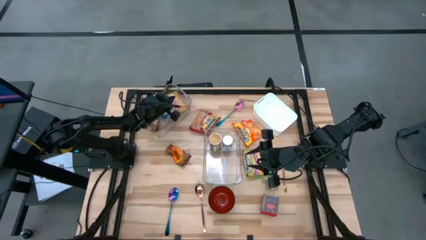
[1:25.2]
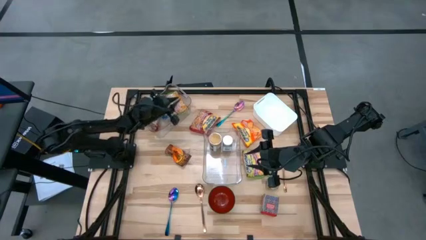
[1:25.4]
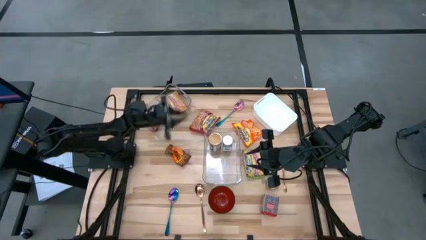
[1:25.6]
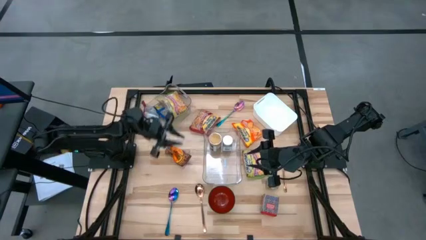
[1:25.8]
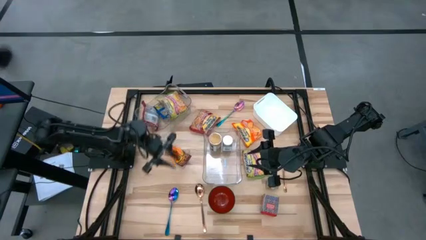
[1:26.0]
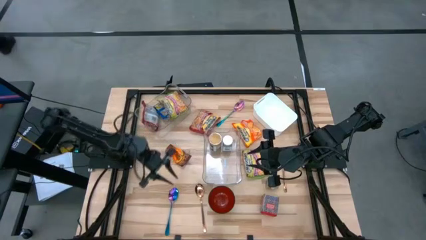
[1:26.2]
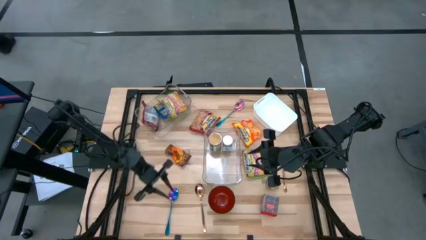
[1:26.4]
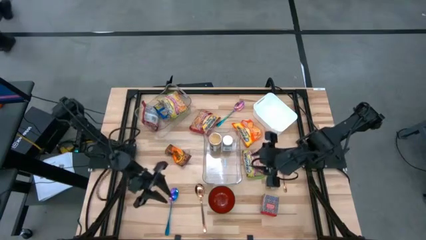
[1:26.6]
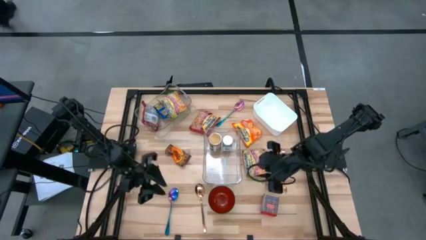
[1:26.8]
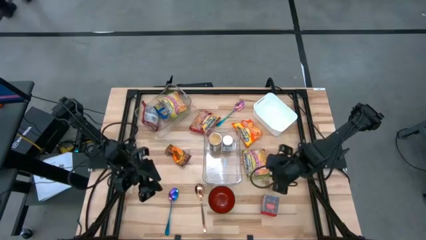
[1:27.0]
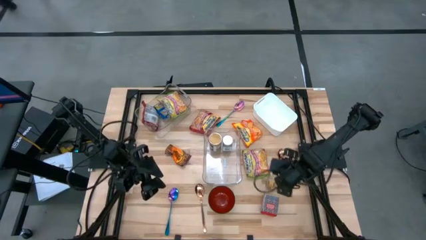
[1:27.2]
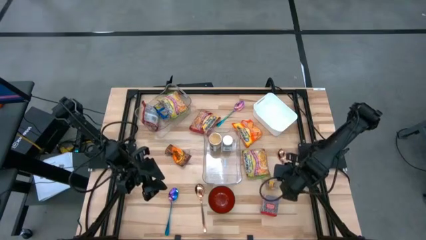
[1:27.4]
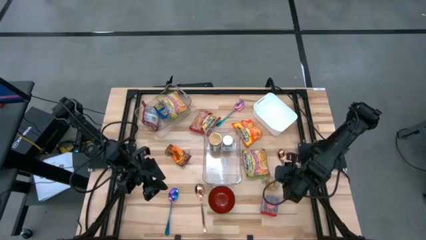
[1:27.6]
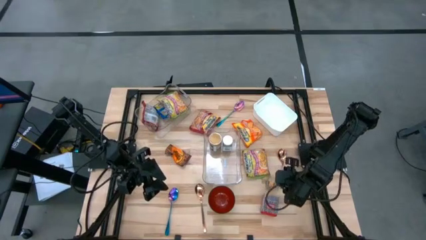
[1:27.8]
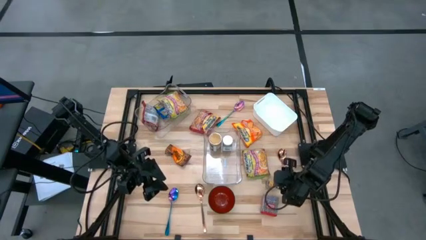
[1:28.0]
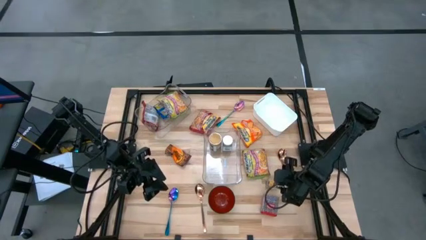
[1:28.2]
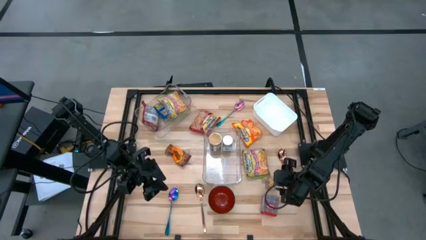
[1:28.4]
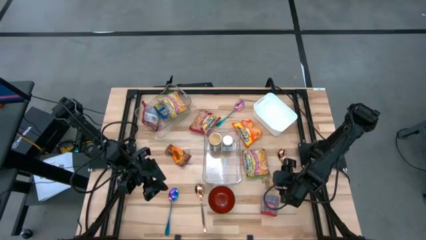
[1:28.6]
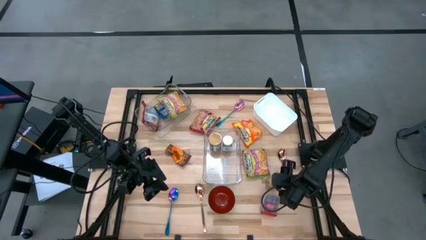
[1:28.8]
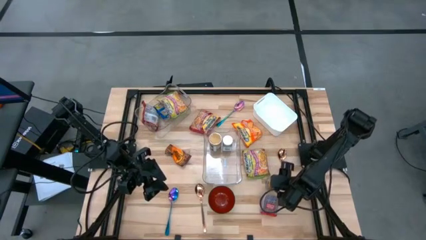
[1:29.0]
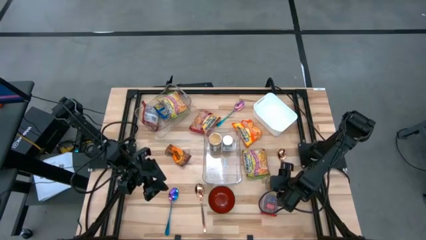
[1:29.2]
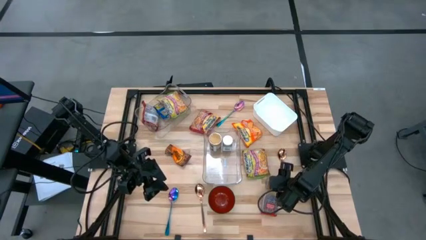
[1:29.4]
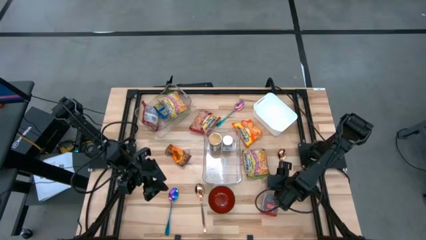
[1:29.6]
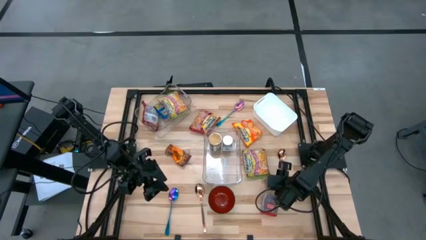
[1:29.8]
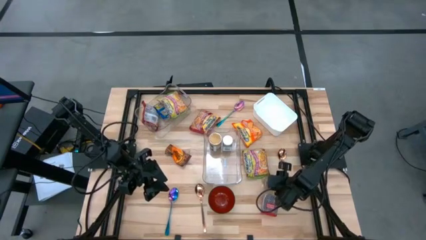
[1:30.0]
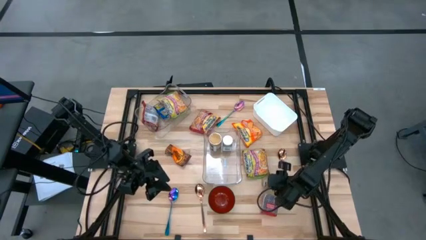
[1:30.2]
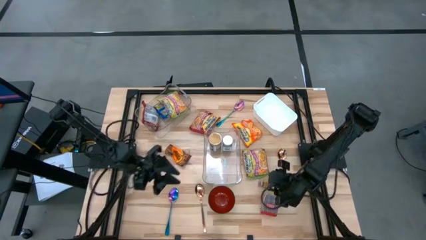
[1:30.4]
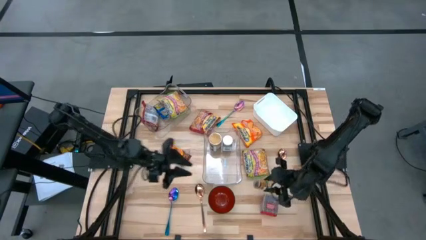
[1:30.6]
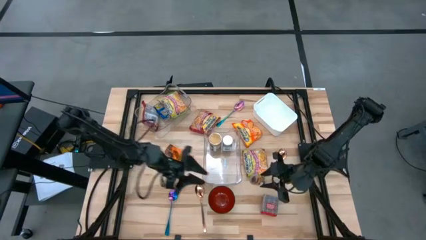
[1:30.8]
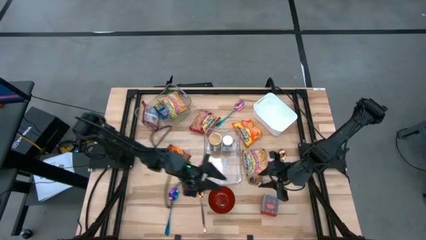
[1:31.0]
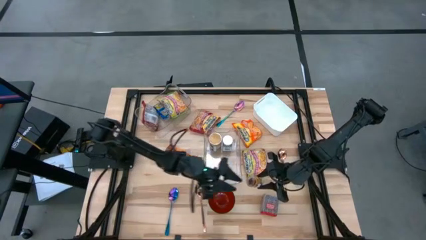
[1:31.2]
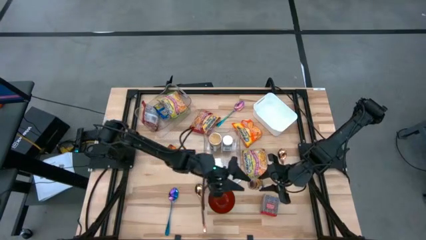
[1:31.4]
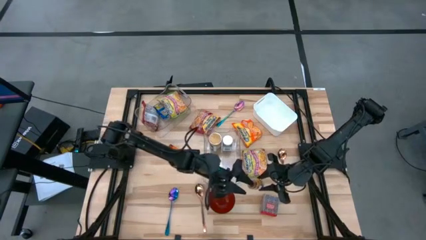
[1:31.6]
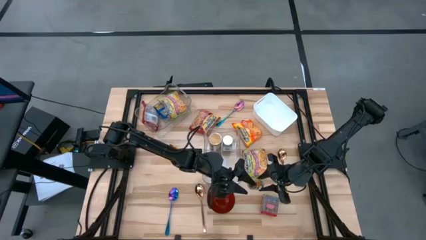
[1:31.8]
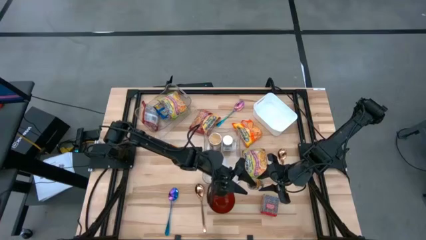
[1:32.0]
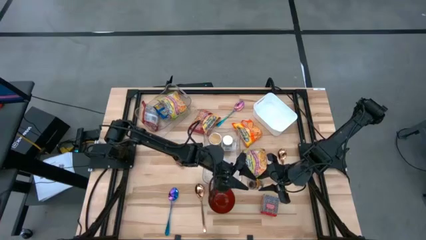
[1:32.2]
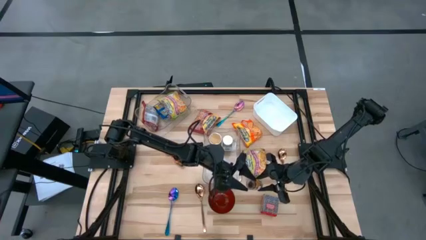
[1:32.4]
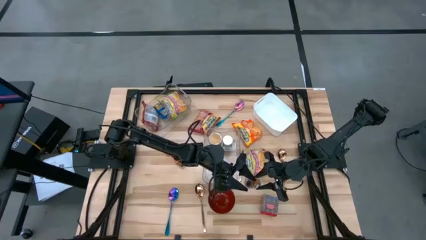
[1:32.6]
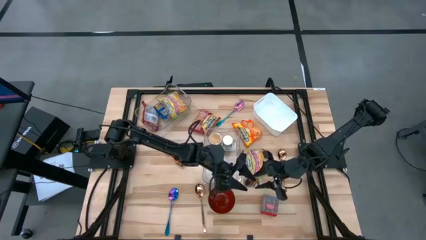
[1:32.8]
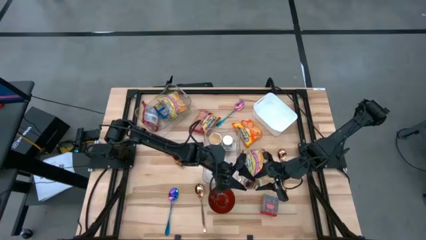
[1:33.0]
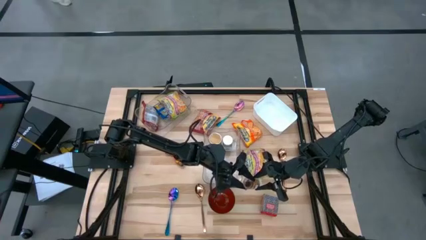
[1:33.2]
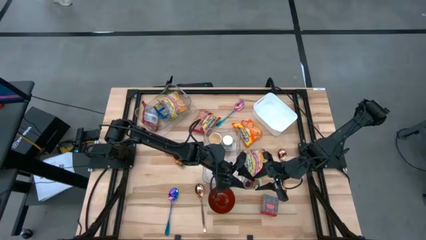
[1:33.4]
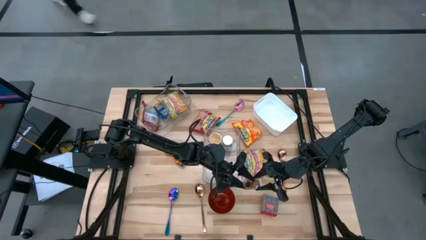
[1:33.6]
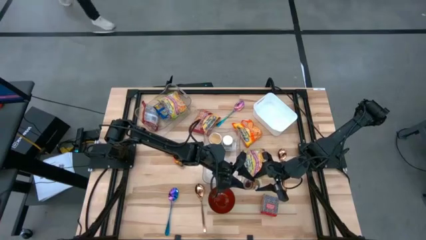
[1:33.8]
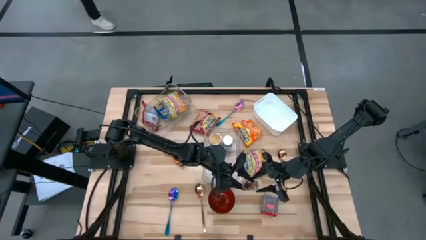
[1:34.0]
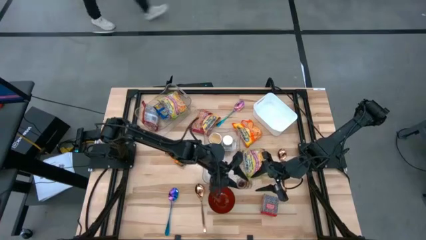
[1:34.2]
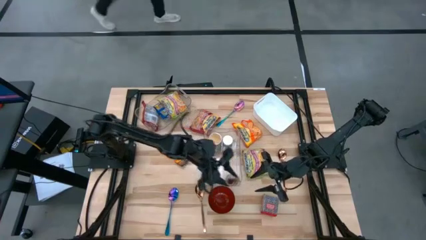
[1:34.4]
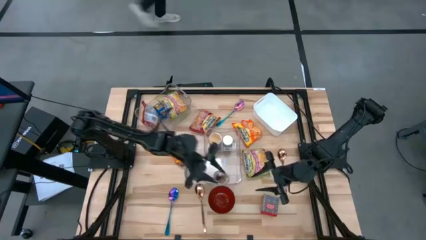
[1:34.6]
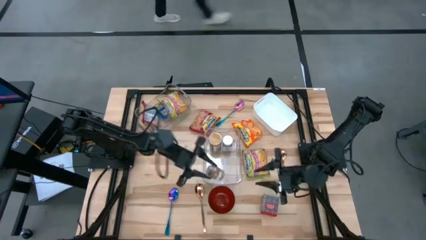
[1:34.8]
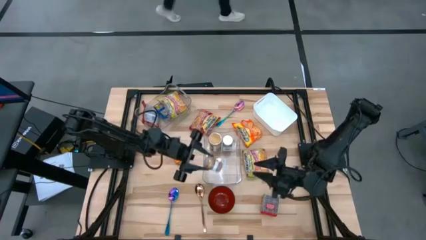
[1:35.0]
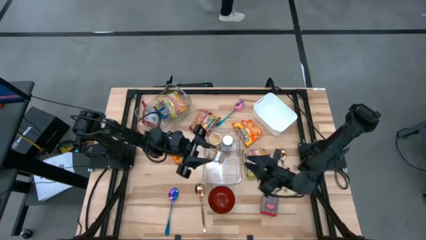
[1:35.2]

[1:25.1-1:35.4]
Task: Pick & Place Food Item
Put the brown spice bottle into the bottom transparent bin

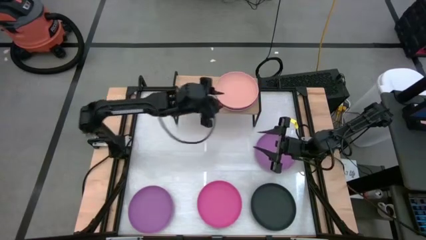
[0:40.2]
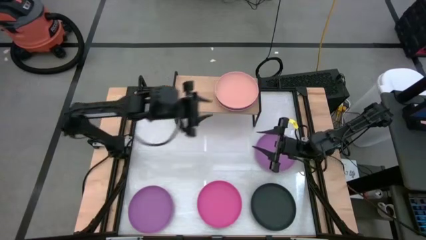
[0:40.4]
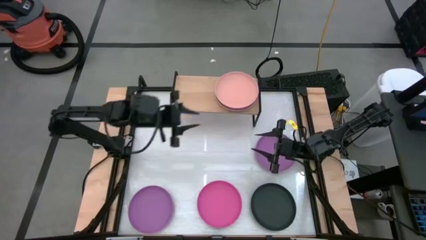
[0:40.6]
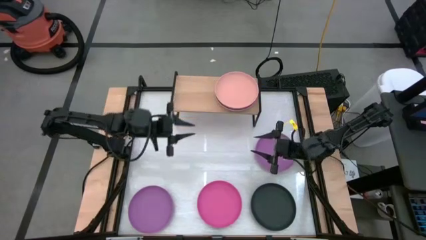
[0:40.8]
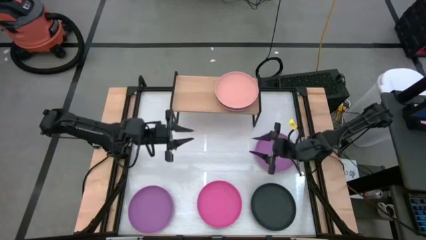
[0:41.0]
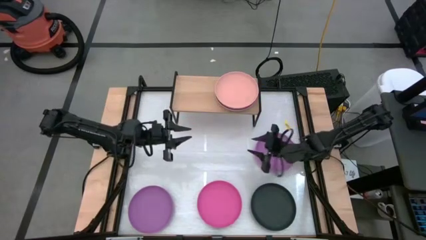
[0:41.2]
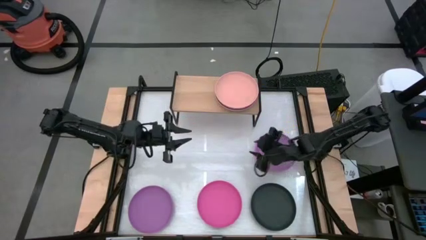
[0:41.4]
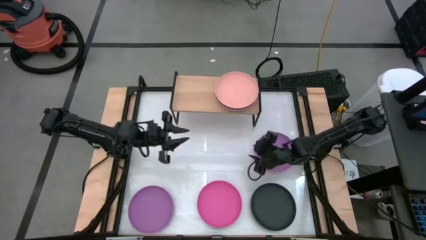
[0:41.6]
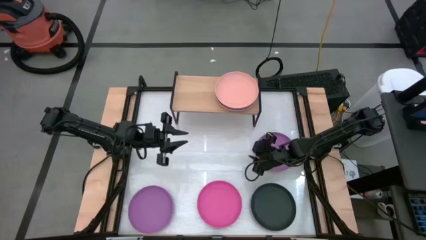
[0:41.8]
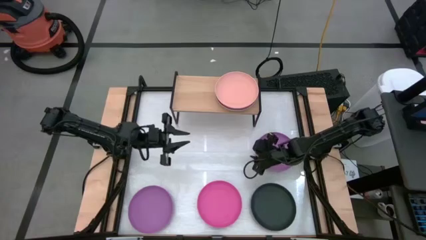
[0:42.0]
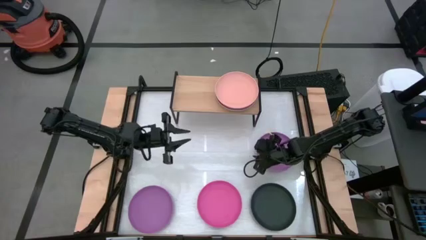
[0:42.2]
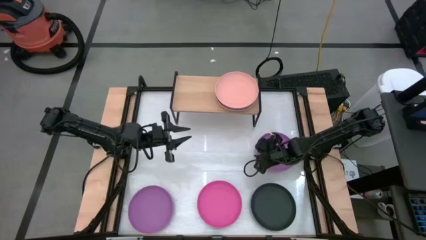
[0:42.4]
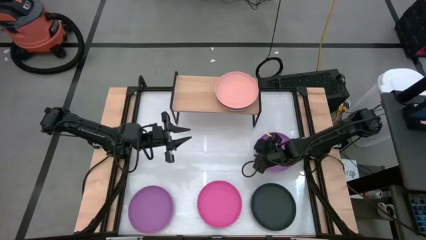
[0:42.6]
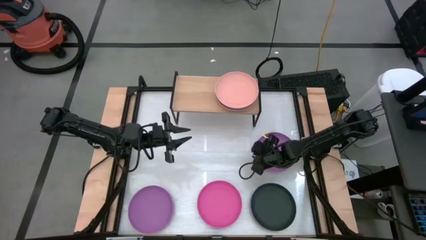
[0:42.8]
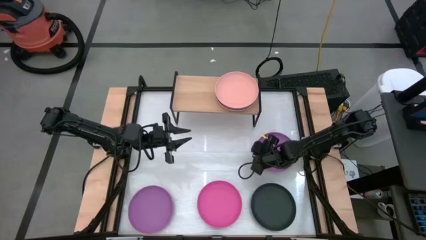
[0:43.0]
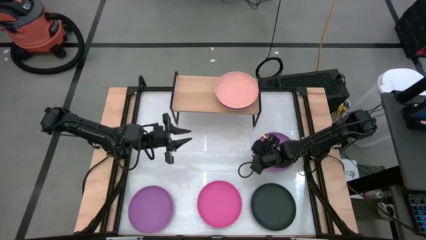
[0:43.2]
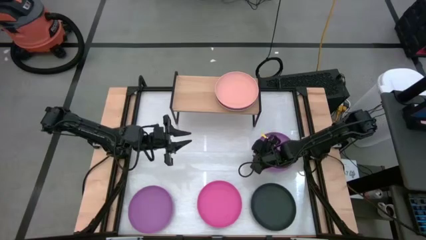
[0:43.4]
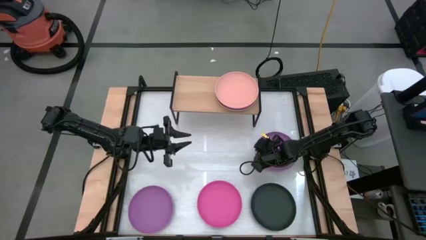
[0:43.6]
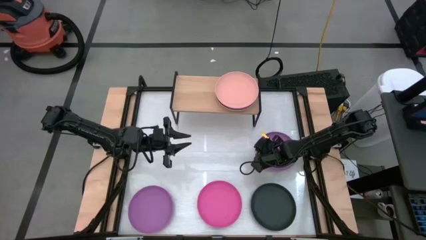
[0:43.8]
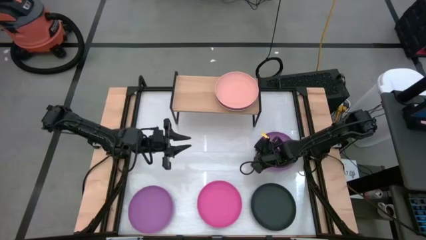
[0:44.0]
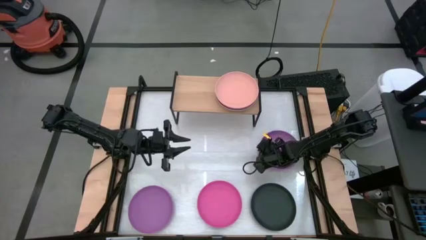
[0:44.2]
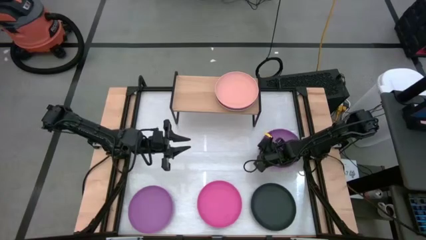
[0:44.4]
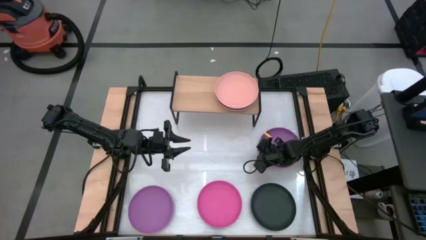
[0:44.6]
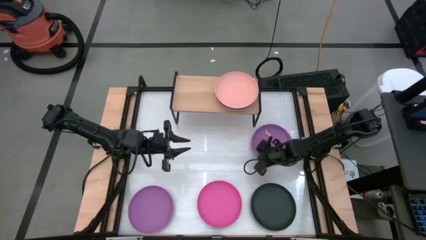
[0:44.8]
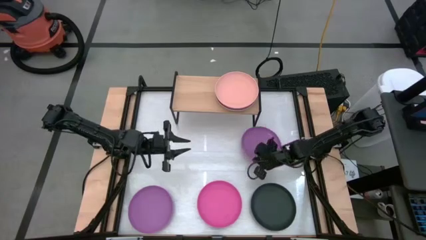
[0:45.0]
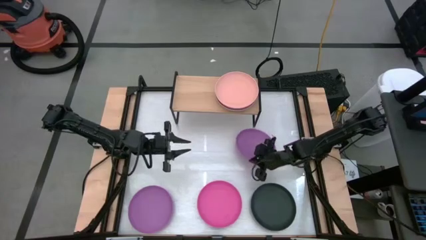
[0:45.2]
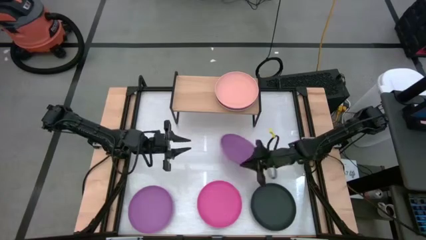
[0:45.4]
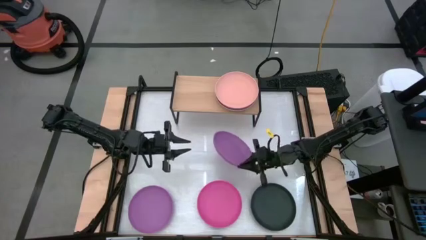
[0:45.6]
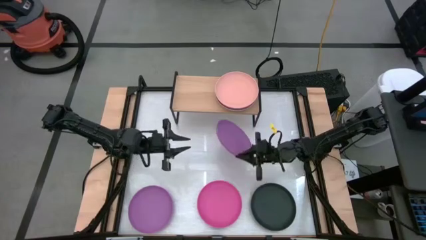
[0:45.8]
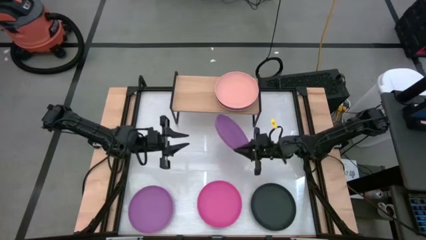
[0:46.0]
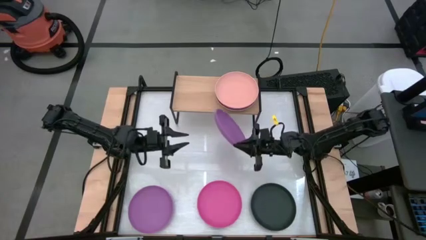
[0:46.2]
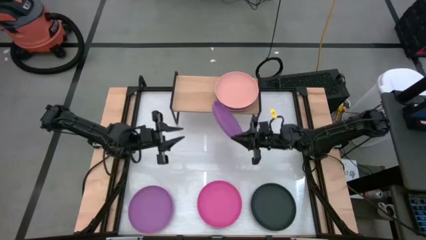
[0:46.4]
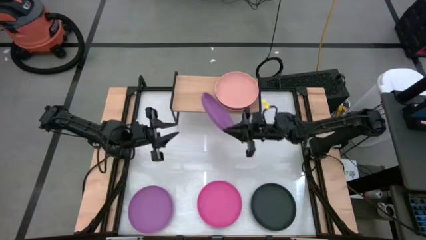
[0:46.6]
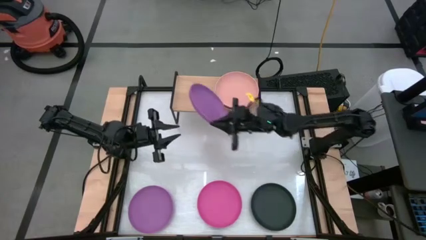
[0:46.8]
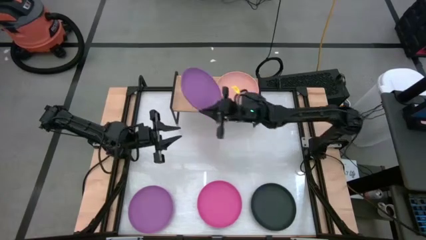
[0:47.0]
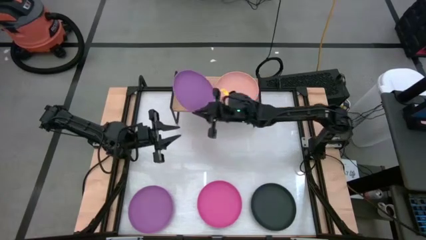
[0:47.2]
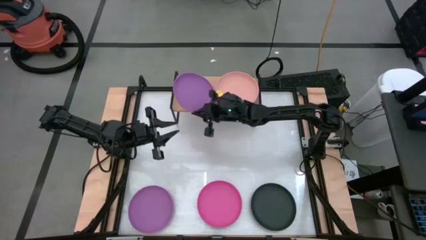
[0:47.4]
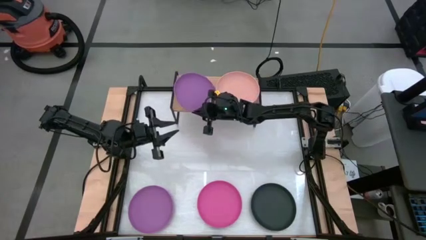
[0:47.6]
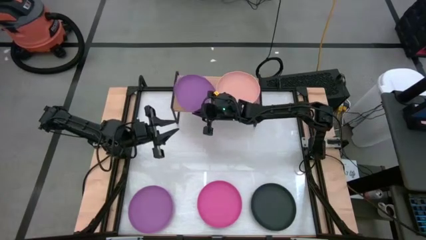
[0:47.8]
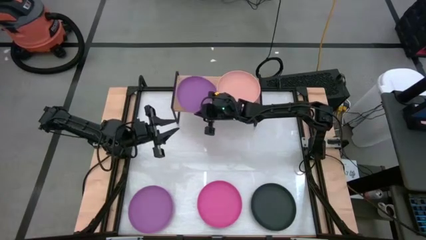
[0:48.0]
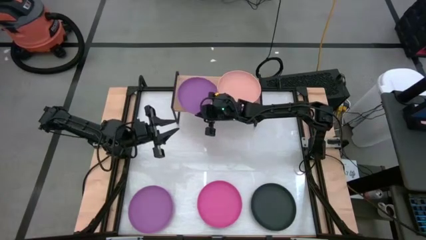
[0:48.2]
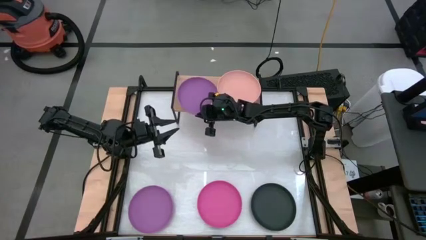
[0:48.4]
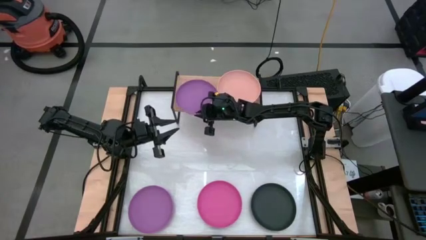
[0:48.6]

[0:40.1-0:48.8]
Task: Place and stack plates onto a shelf
Put the right purple plate on the shelf
